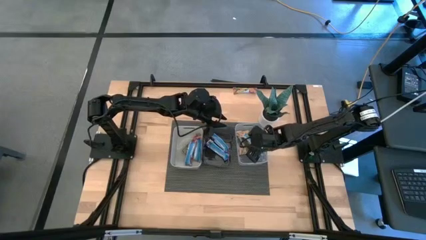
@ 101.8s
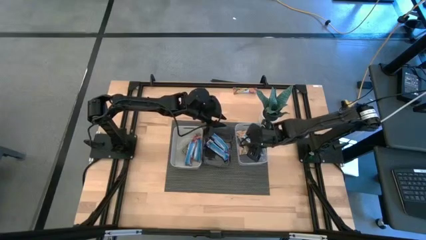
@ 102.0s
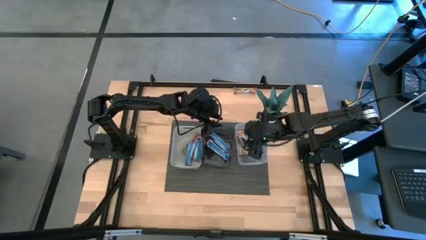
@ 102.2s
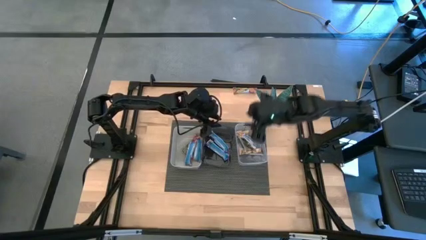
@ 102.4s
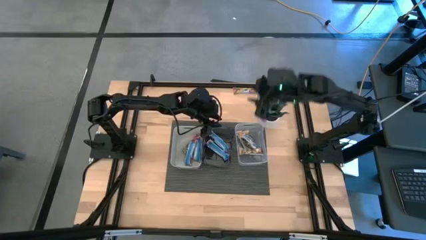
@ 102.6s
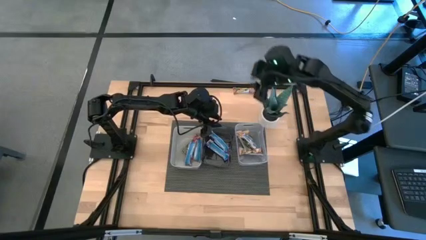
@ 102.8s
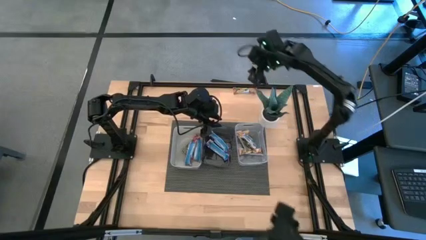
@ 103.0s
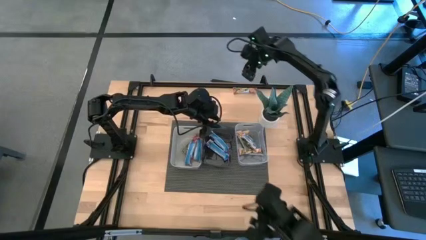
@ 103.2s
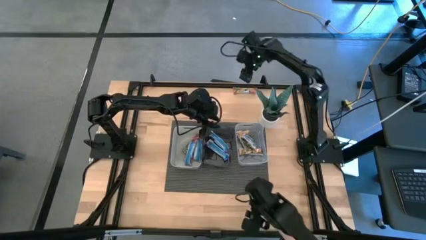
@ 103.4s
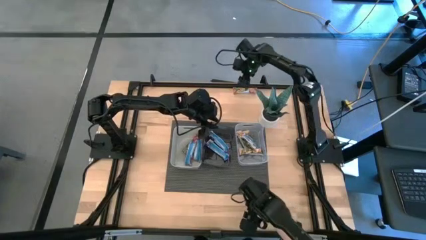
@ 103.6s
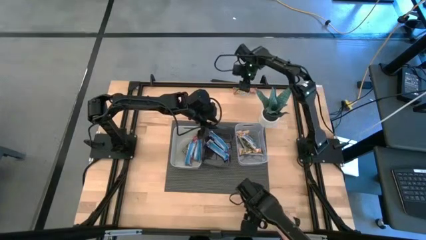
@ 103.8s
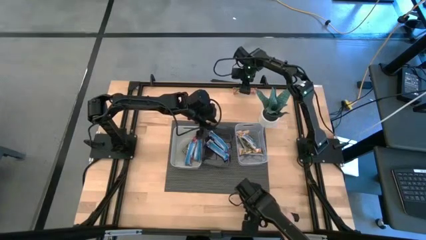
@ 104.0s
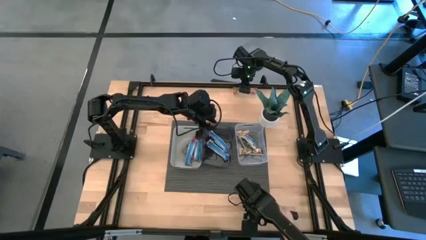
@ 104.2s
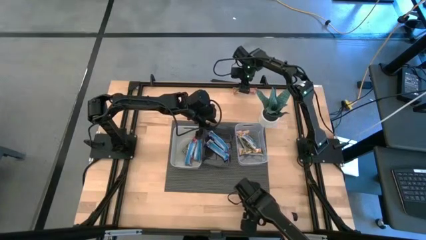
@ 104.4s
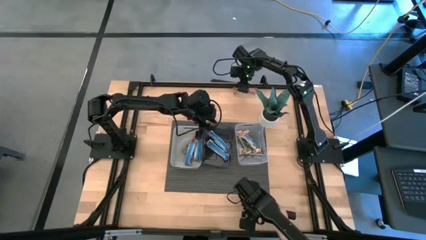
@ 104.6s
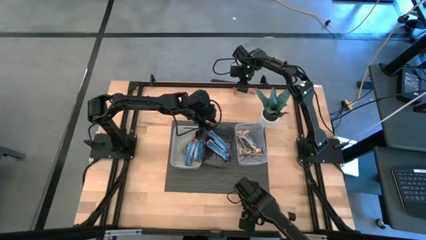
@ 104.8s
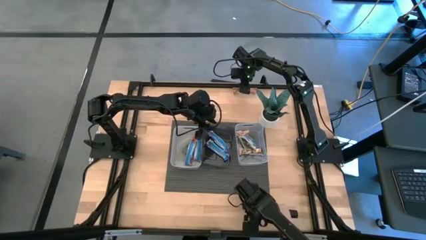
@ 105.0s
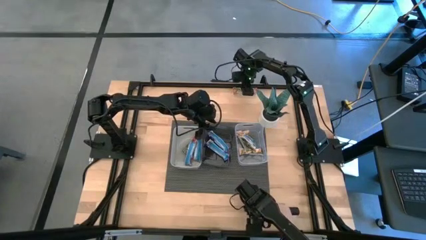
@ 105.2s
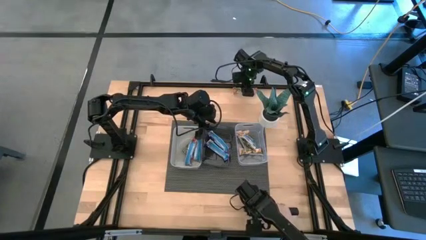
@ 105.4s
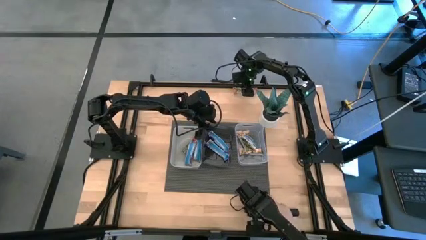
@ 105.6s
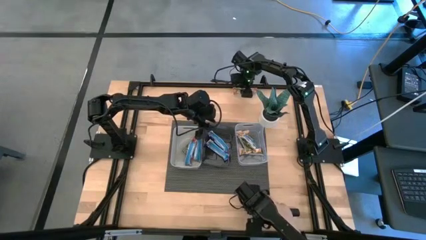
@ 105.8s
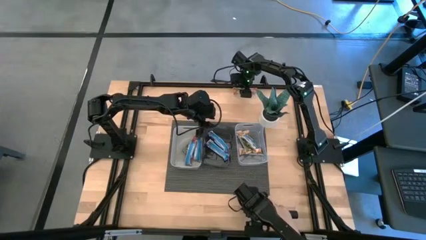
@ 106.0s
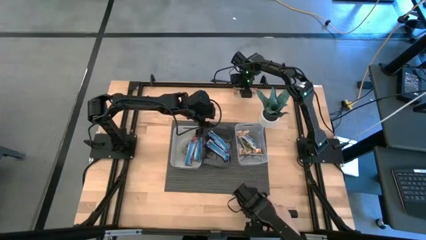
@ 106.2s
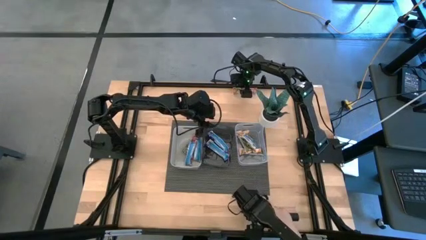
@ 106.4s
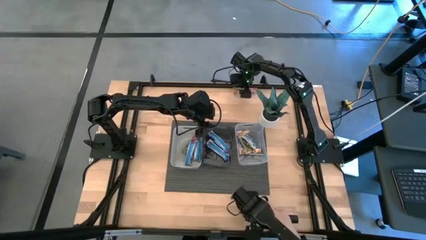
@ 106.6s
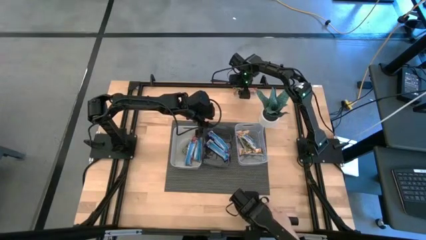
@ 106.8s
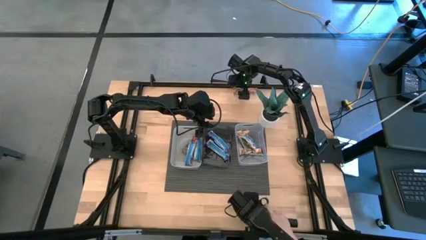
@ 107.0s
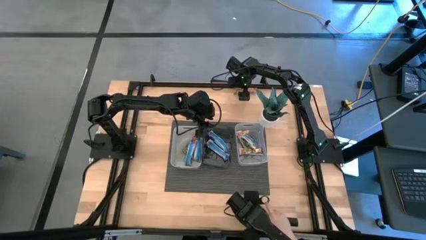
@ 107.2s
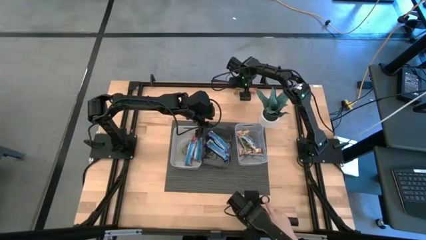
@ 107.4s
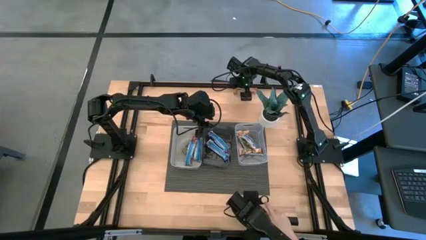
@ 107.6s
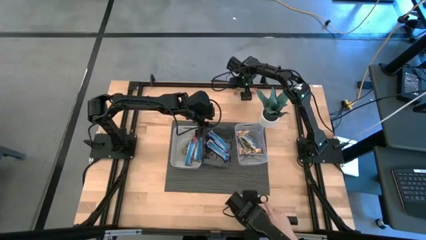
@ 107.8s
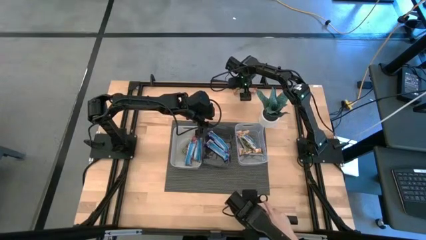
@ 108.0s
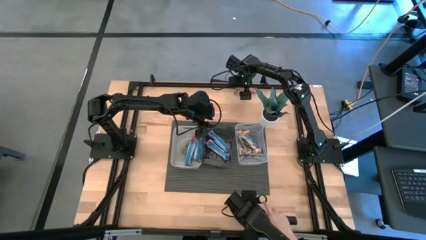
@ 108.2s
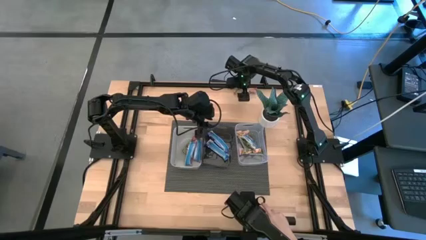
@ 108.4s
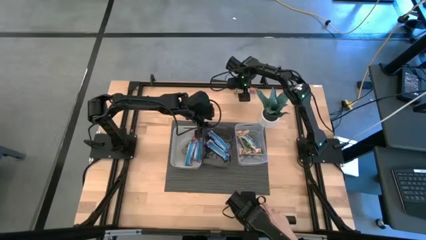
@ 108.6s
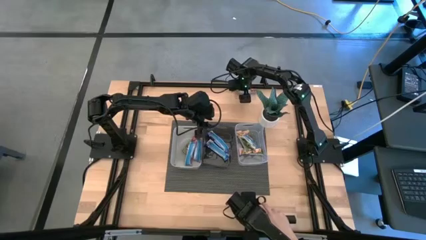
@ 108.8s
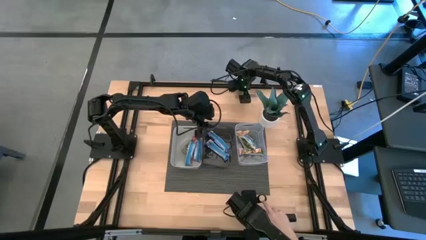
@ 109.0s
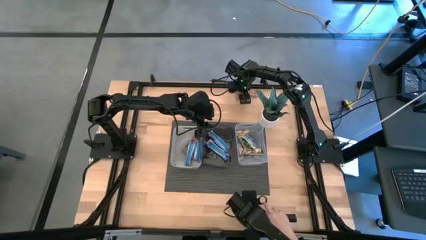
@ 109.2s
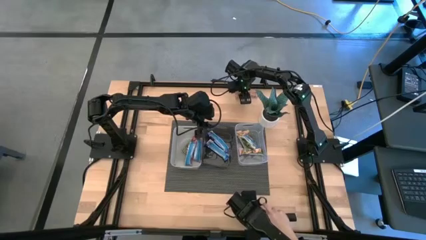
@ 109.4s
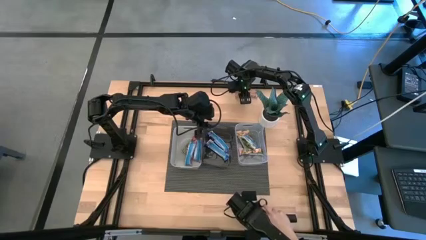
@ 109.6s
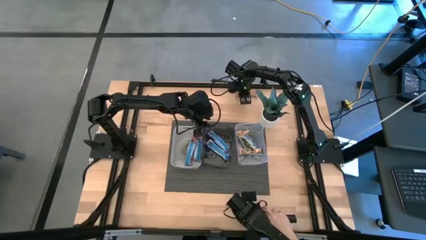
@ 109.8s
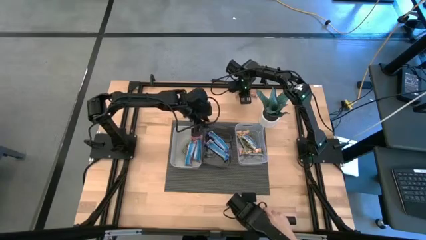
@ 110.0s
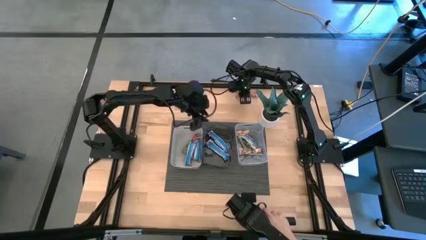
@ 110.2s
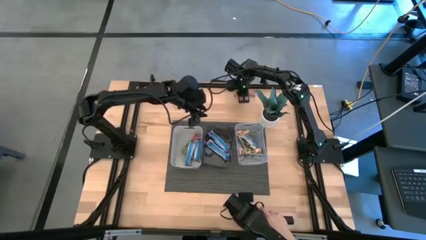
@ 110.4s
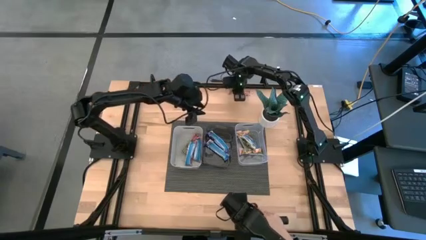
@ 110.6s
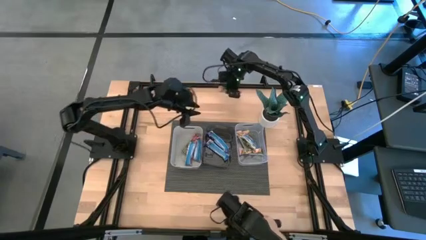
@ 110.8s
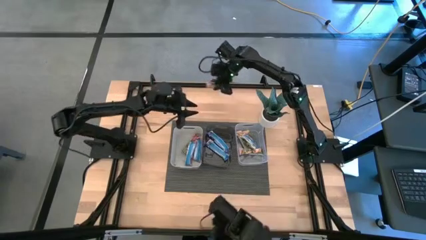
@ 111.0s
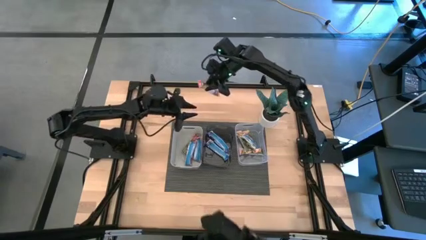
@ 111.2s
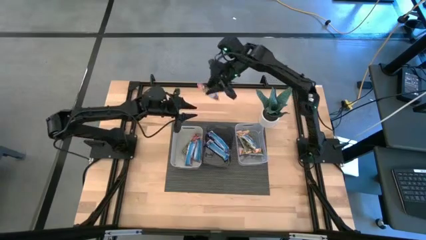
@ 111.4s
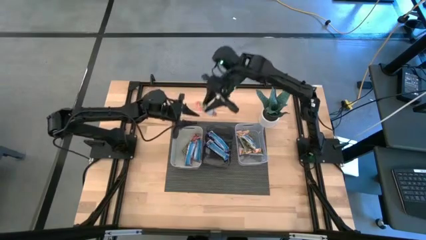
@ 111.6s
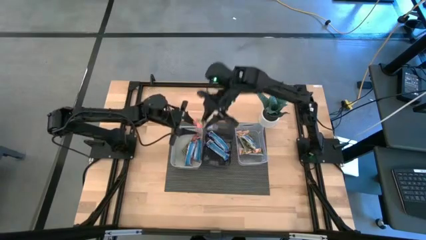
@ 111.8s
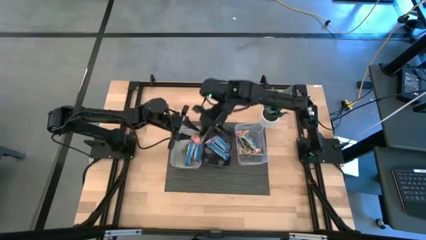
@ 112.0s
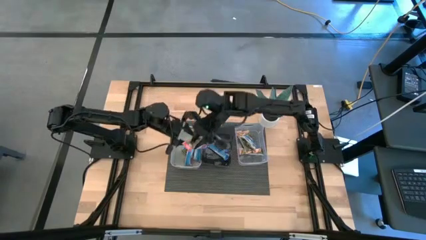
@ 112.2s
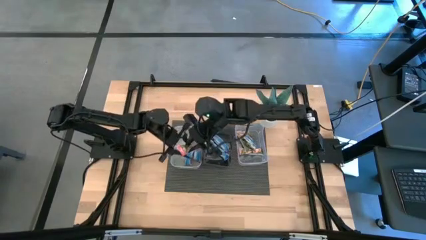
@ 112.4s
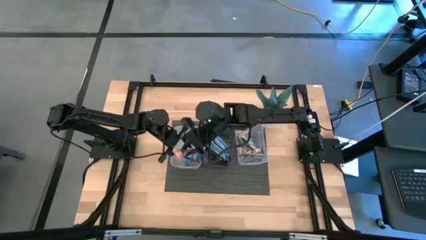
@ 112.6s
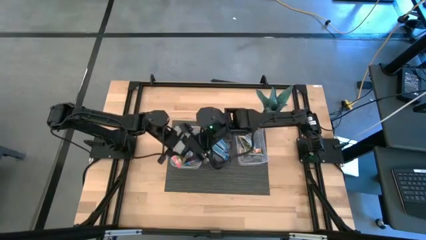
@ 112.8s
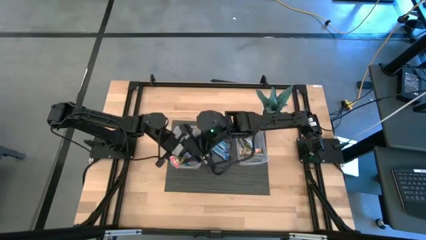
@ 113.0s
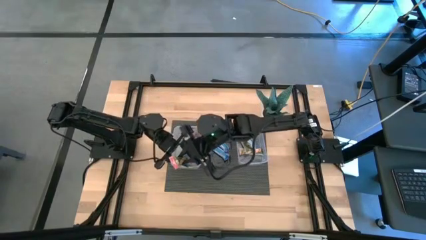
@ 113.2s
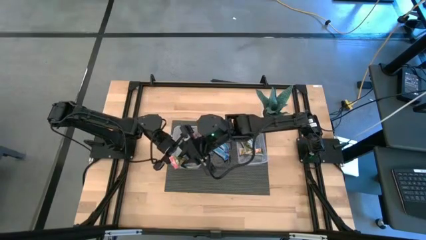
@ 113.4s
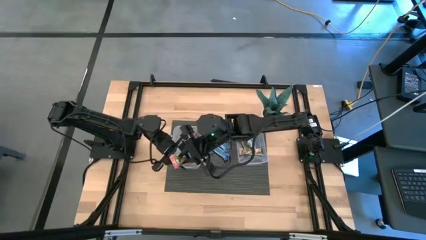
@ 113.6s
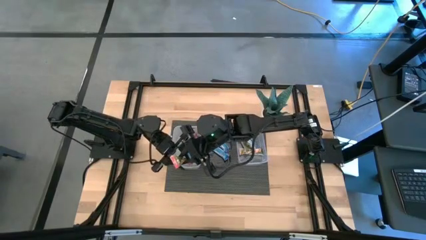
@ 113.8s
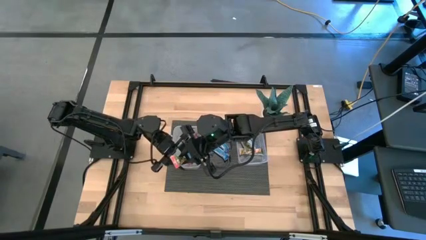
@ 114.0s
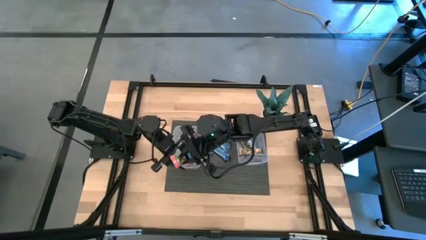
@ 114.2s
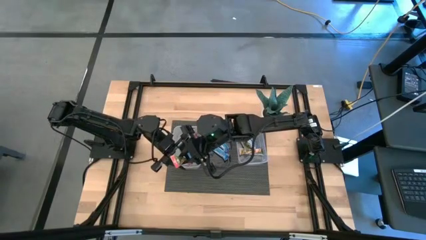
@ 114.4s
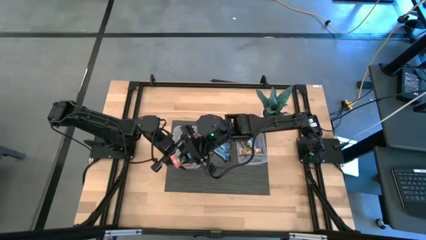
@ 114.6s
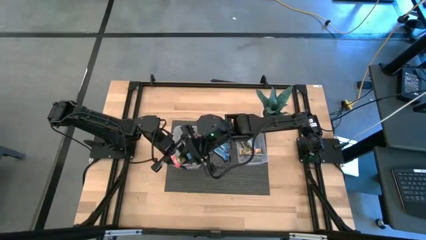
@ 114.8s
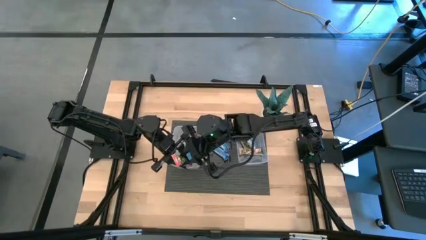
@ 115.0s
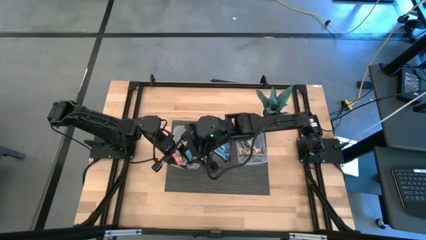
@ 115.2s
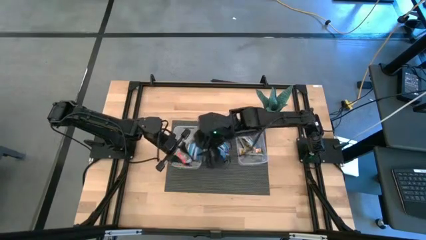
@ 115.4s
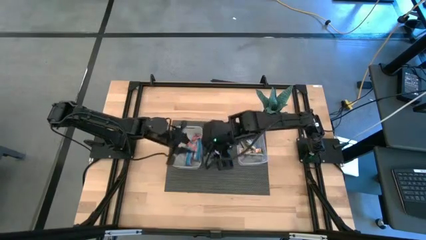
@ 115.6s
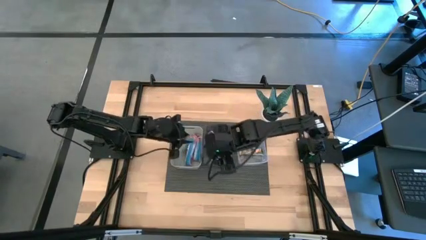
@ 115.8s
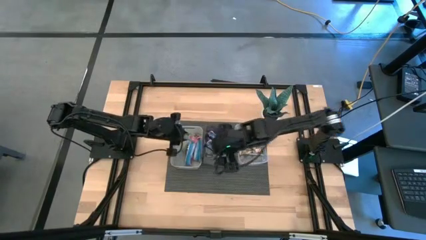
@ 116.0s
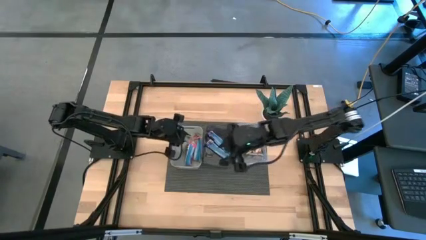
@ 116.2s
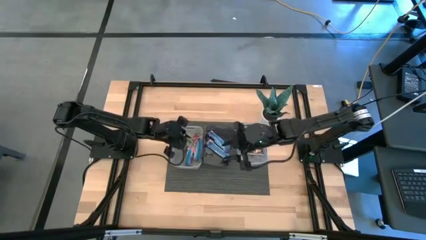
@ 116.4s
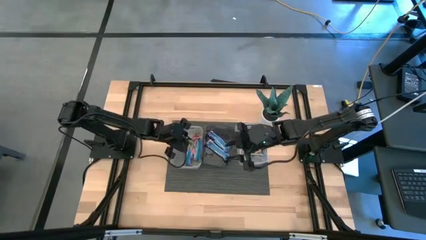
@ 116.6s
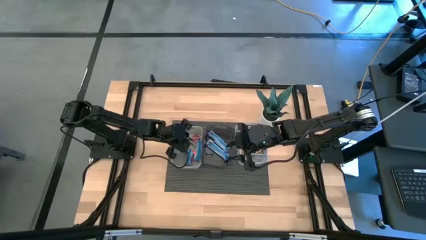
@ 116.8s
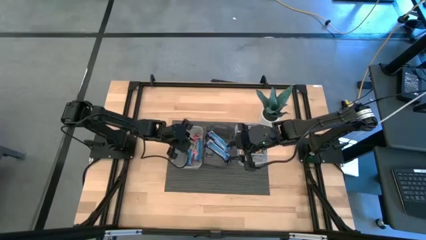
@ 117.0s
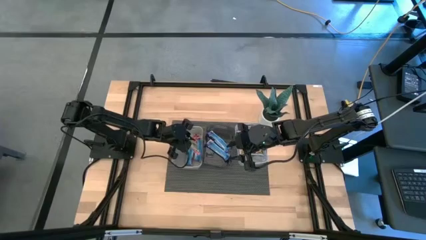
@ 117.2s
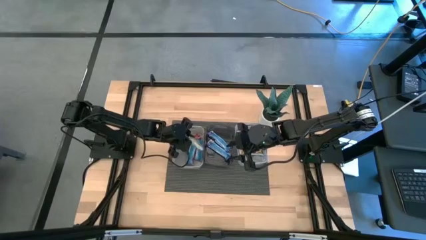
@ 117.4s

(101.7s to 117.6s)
Task: Pick and place Granola Bars by type
Put the red granola bar into the gray bin
